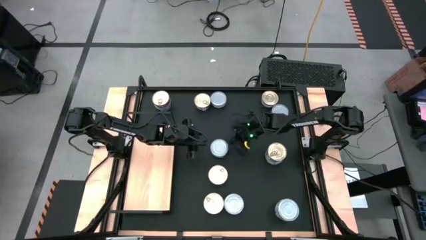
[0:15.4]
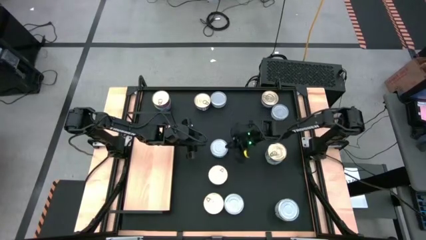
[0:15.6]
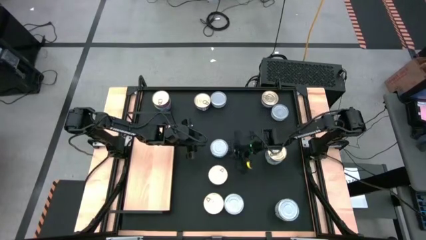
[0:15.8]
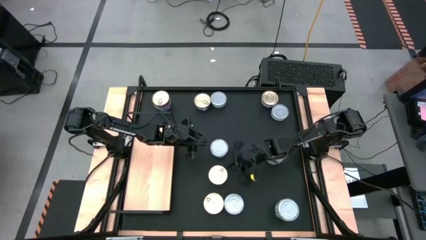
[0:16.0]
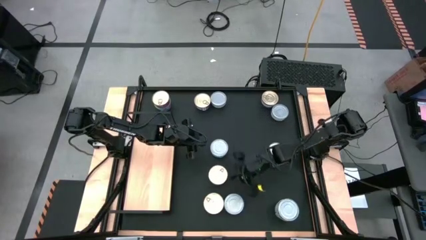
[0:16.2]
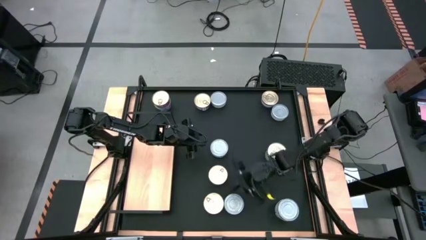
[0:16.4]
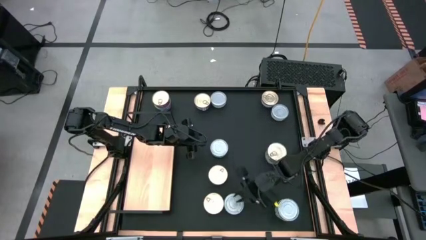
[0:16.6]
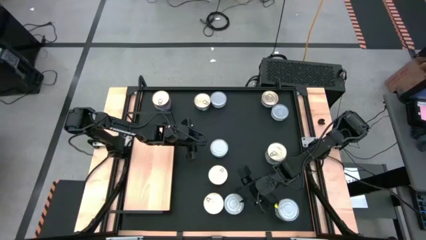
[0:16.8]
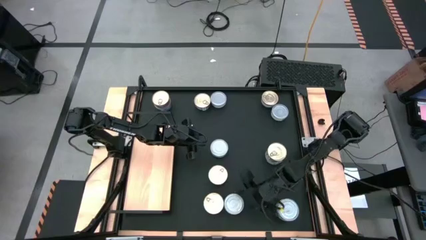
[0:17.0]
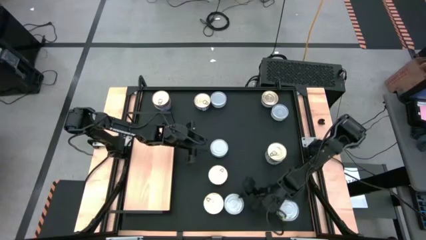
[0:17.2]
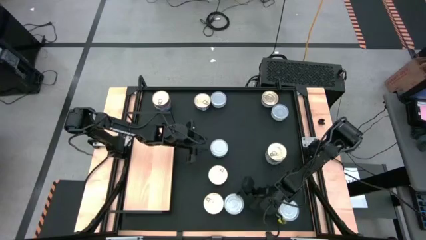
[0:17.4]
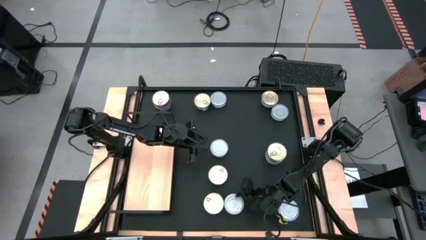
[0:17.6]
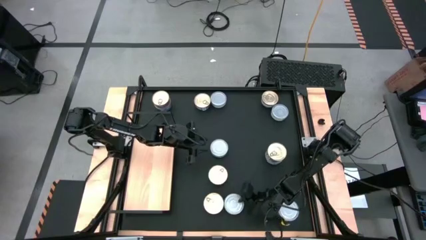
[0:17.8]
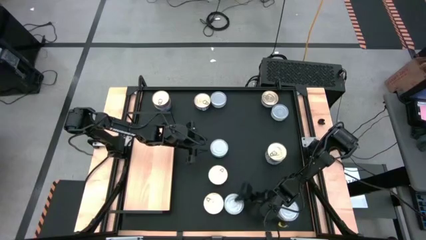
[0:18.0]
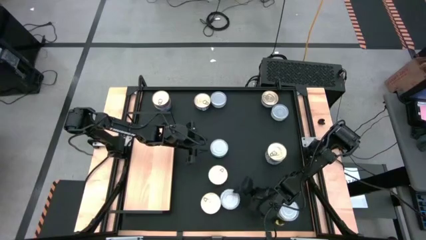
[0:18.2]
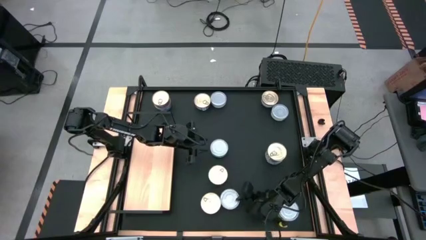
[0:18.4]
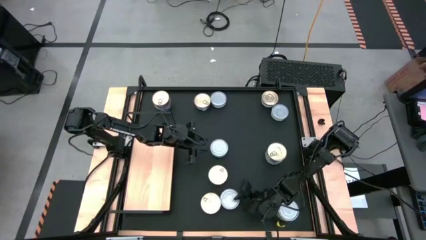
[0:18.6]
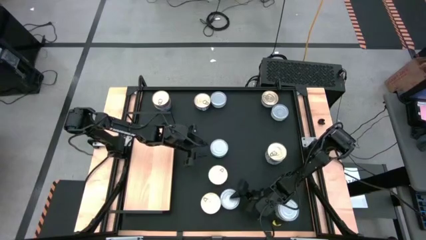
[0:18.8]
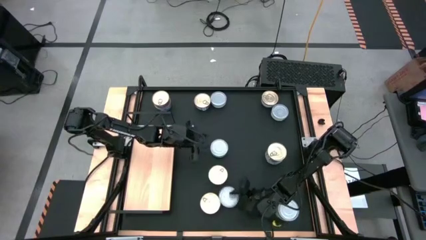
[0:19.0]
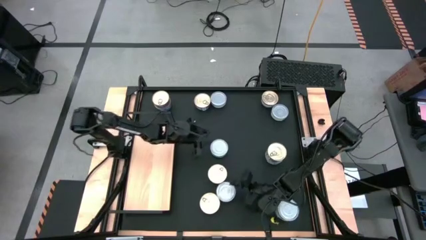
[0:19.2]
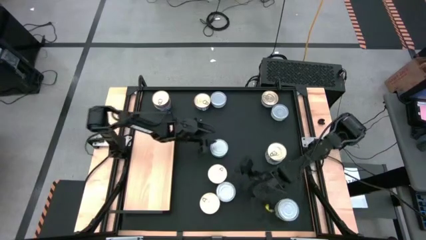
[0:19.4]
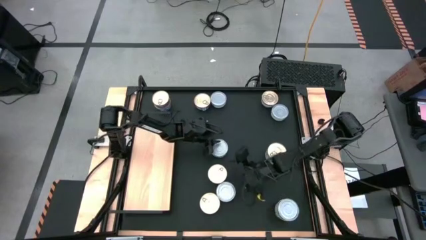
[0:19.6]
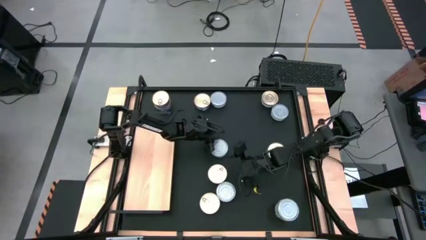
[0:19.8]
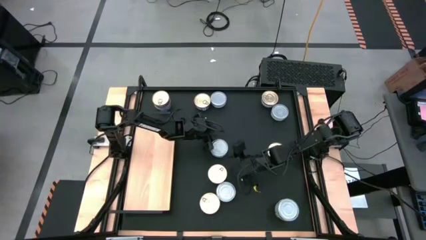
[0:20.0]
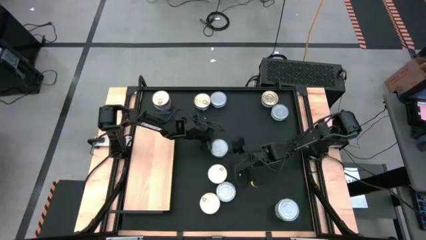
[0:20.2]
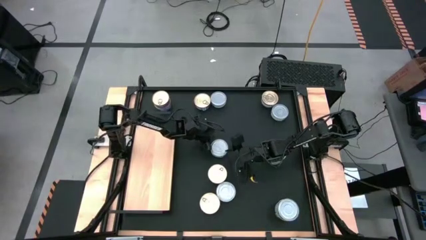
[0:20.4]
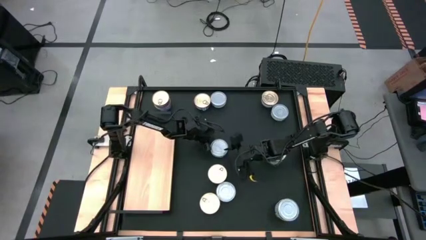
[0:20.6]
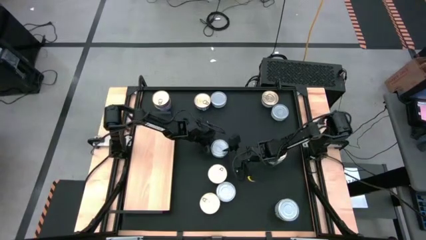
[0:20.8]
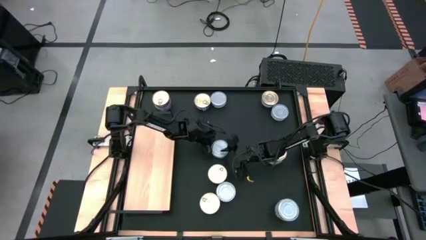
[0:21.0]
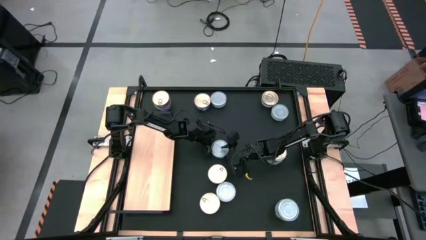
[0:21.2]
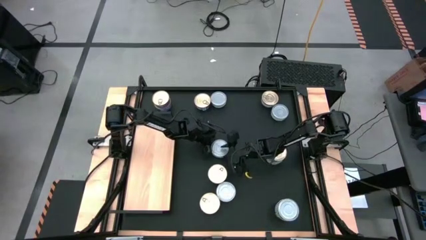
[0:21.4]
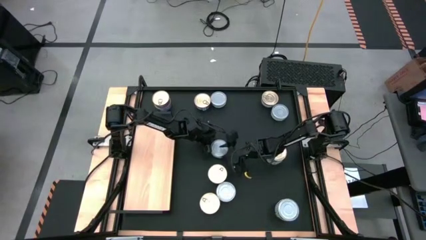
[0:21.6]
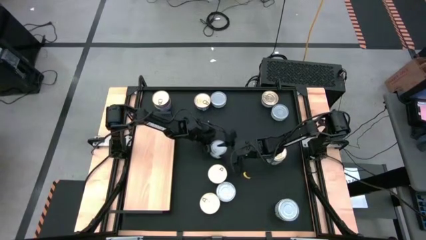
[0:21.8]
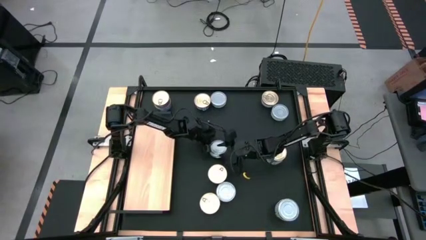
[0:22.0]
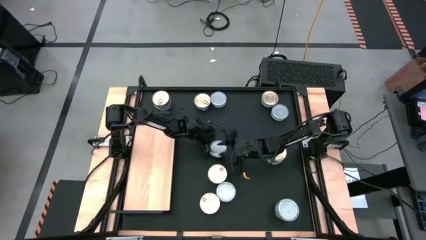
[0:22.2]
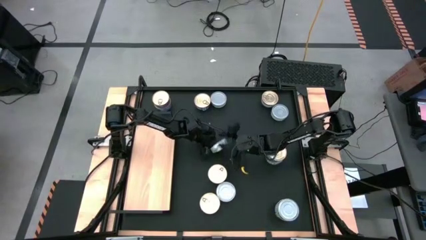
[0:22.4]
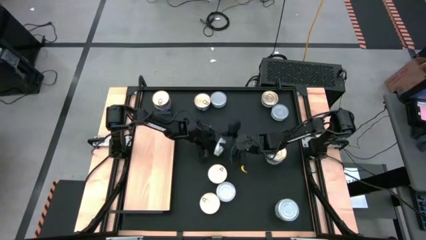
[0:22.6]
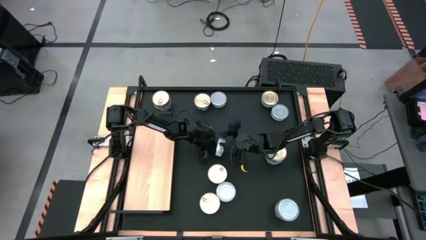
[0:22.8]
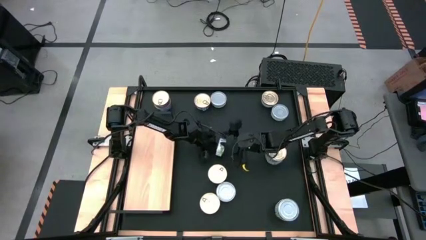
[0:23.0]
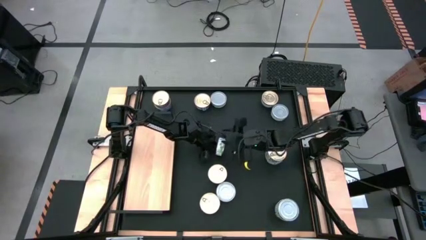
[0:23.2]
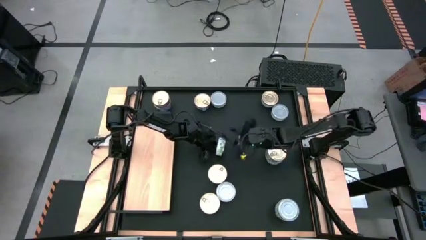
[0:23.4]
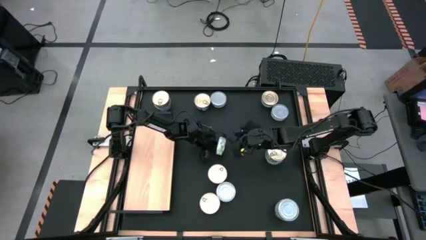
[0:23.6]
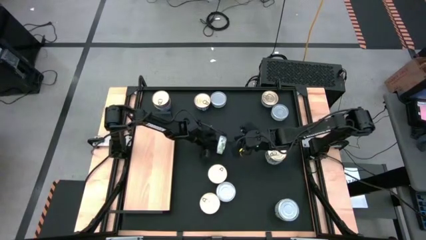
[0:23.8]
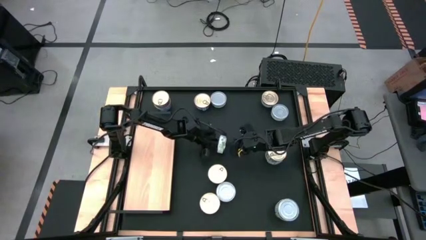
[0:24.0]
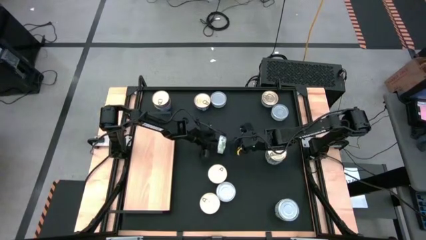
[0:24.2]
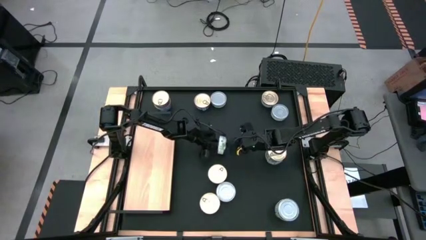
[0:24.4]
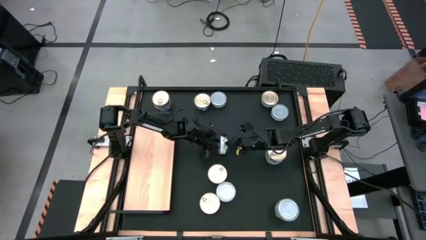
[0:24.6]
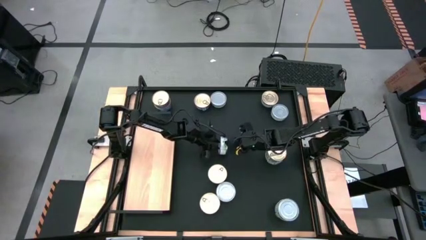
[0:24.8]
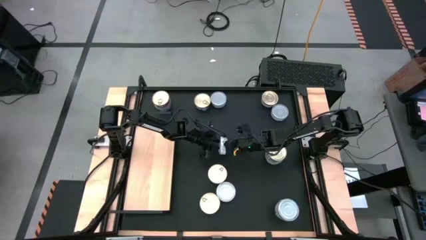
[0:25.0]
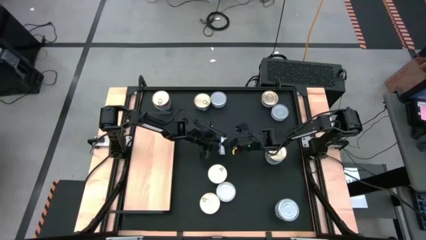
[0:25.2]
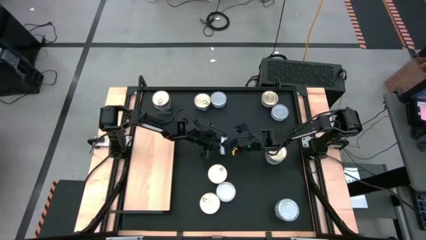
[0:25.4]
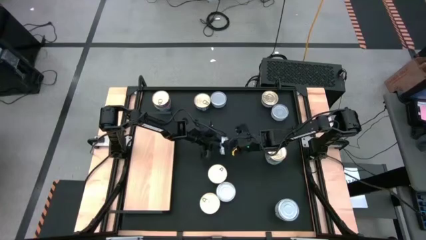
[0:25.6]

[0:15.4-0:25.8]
Task: Stack canned seafood by type on shelf
Put the green tuna can on the shelf

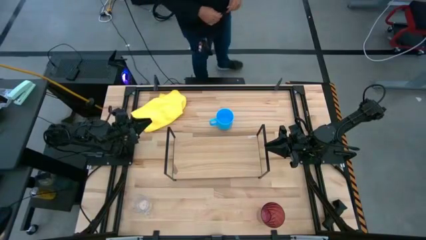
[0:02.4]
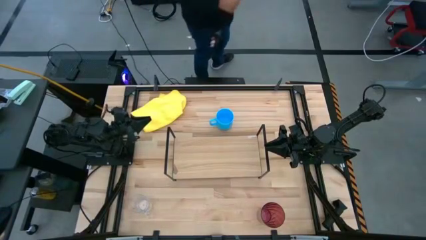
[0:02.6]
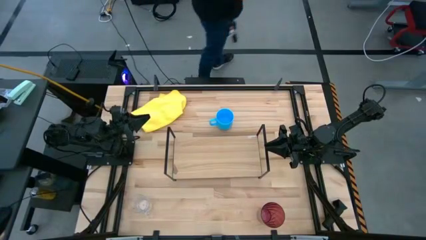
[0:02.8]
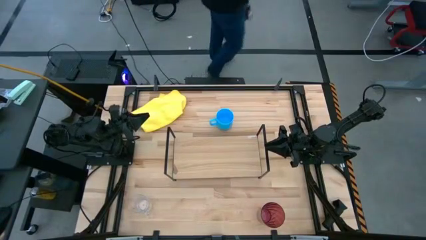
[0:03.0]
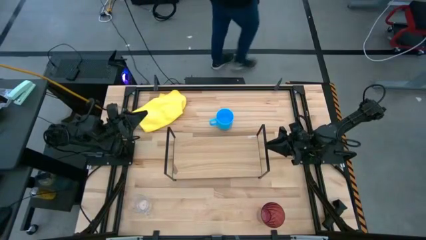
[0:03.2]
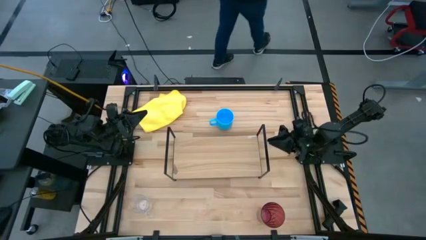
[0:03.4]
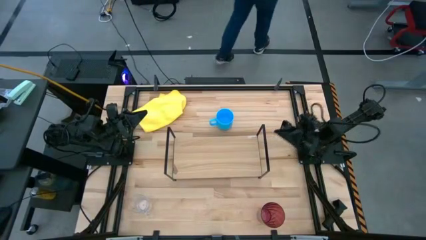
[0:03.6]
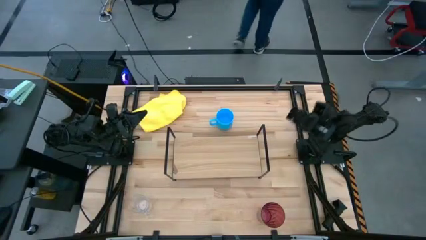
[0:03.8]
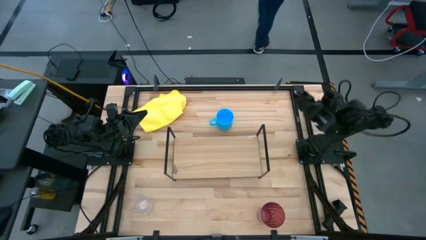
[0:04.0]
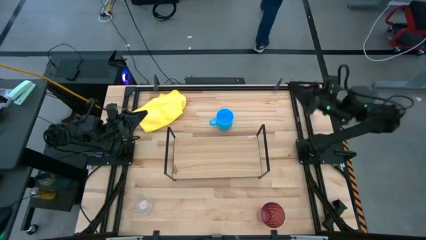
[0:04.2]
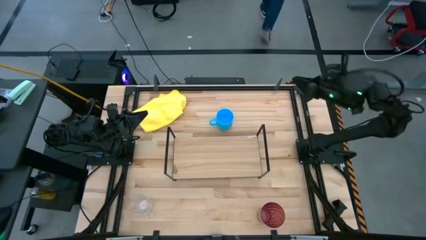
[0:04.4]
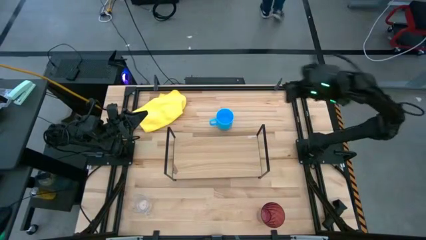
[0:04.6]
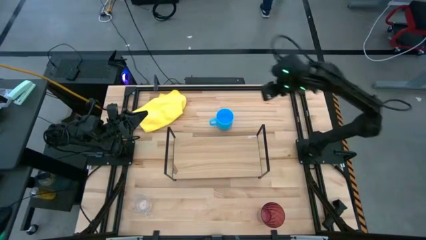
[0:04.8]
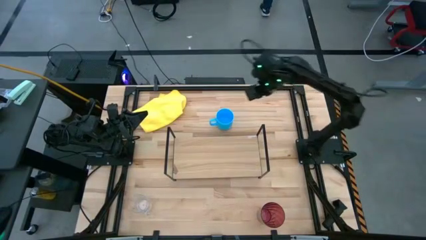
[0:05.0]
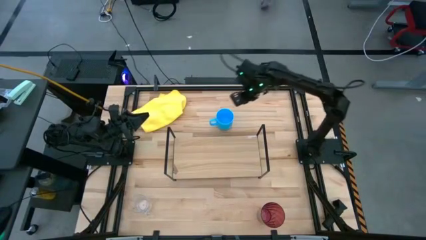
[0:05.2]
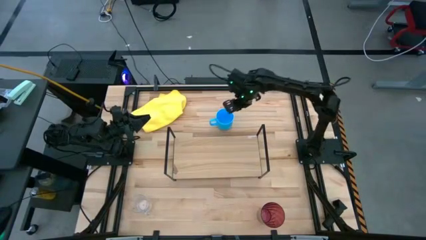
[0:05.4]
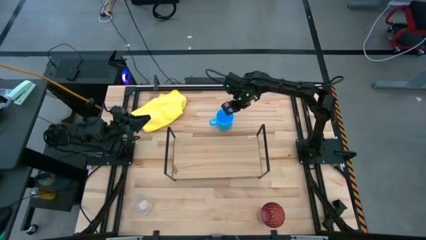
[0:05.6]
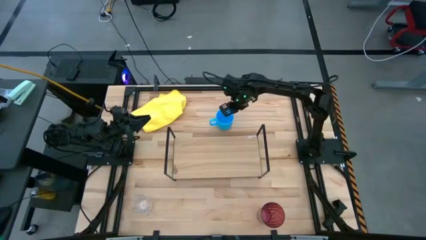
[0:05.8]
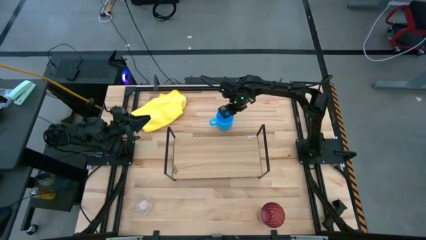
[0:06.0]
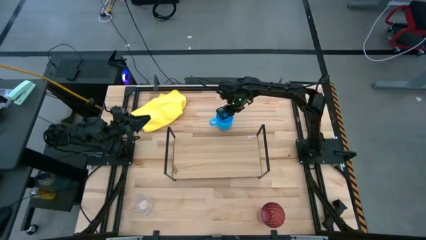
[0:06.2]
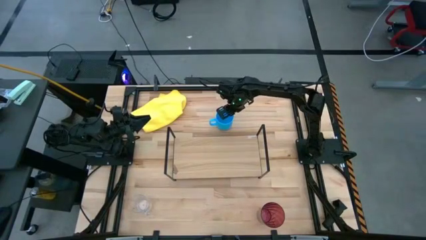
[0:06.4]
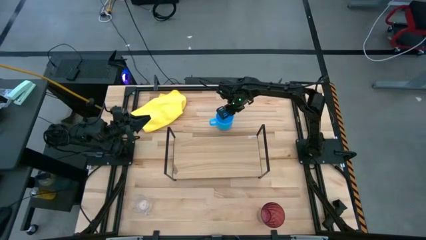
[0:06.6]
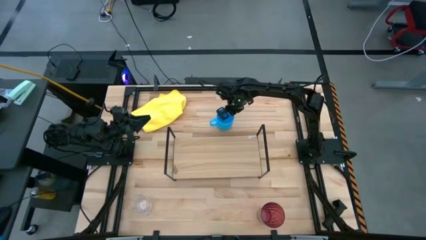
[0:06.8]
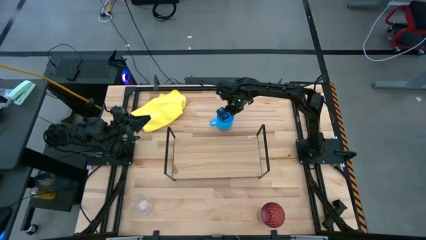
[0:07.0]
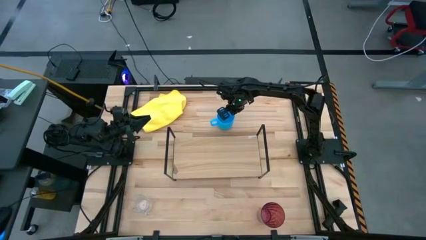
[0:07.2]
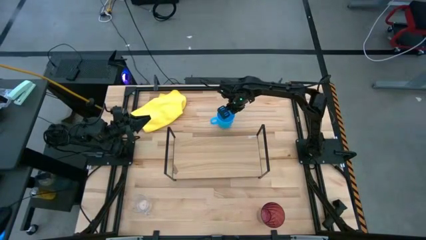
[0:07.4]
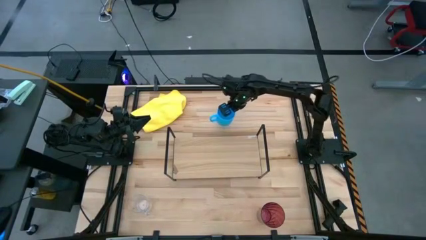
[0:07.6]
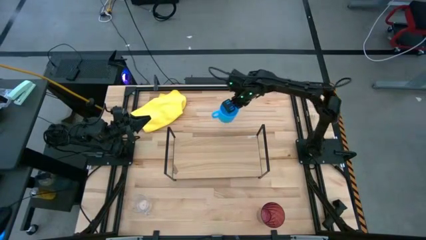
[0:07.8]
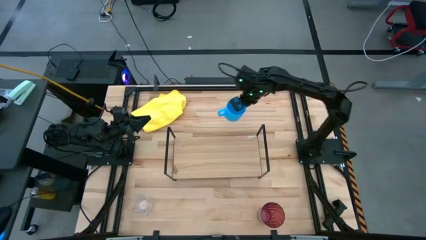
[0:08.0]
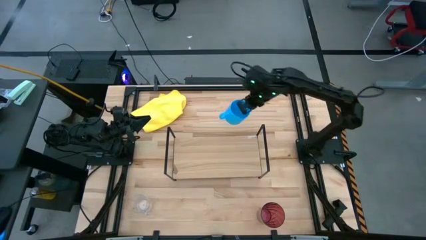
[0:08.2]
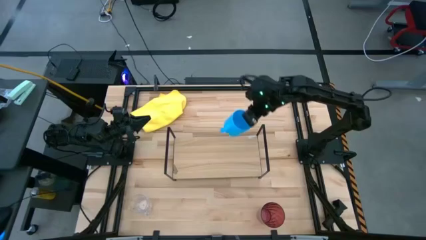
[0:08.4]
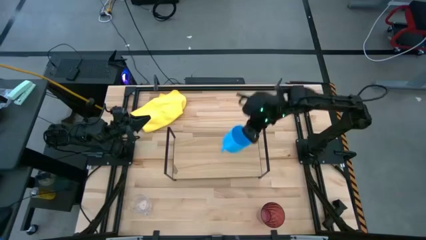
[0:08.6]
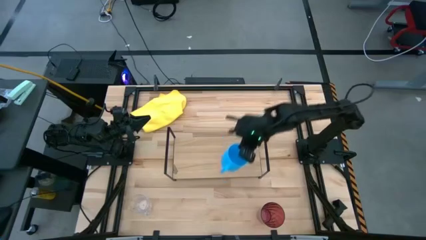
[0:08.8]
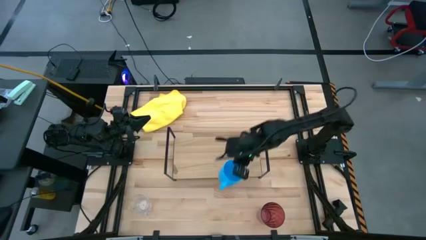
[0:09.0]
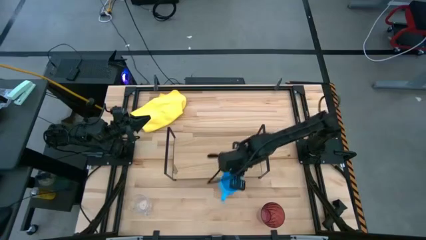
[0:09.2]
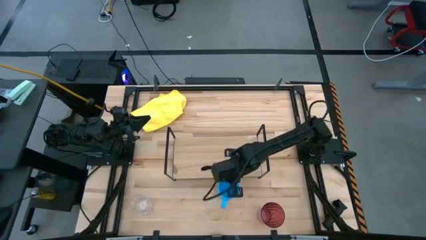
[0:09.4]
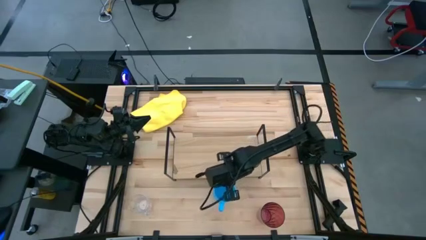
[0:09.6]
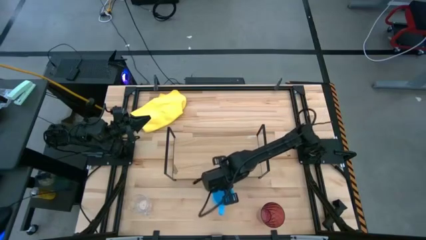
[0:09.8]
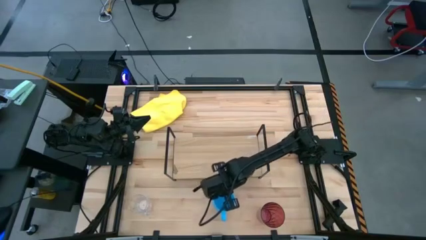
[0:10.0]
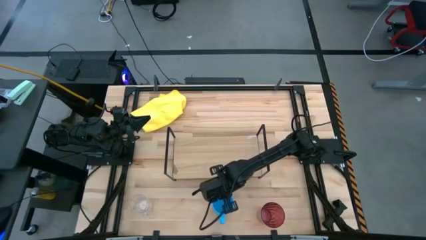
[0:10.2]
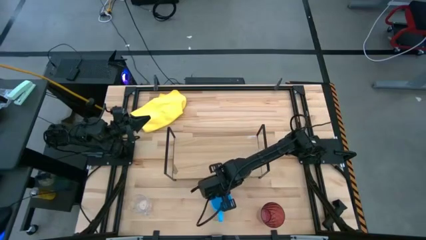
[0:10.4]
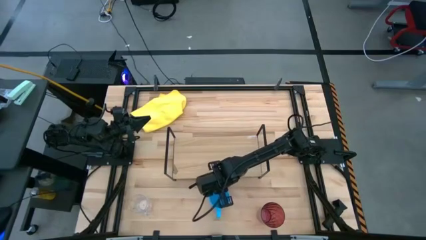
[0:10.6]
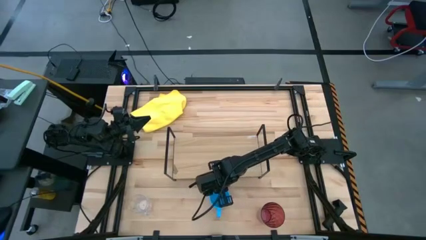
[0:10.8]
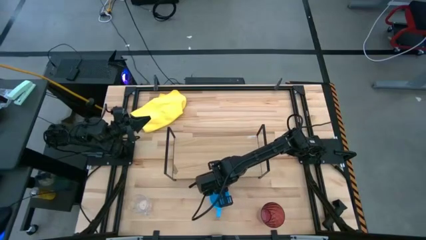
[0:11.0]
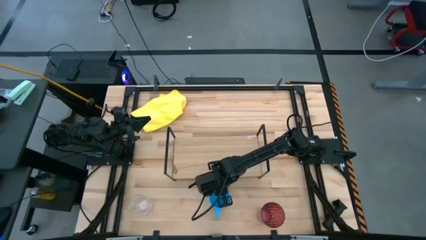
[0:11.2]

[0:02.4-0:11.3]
Task: Stack small to large cups/mugs on shelf
Move the blue mug to the bottom of the table
